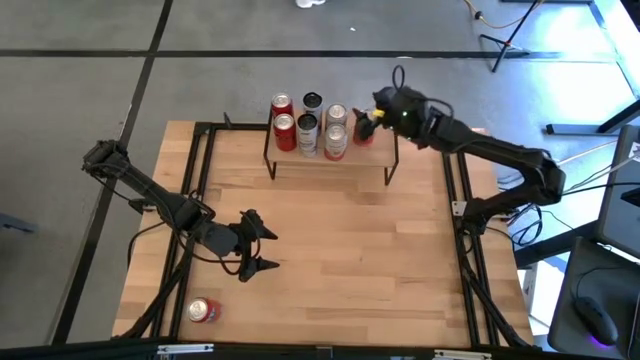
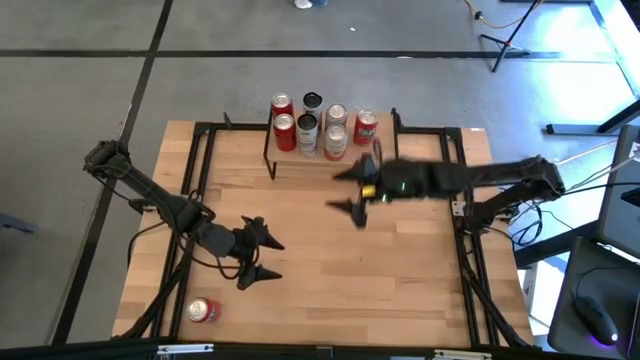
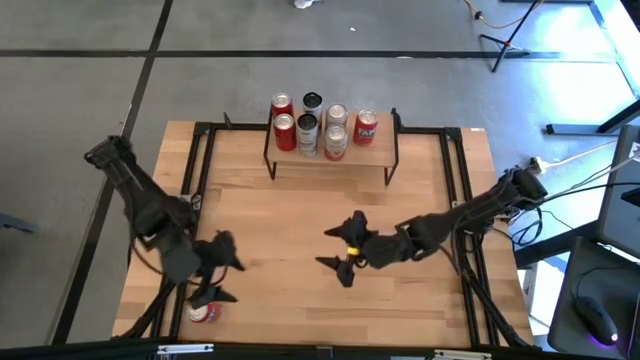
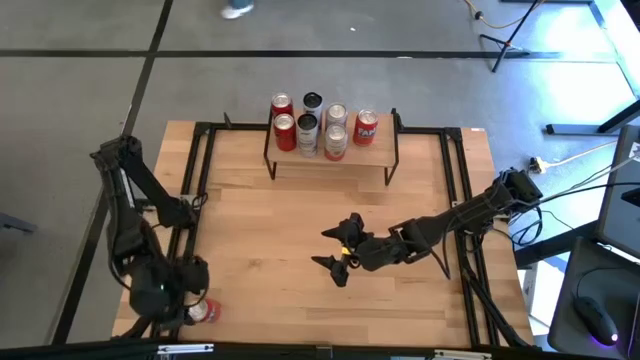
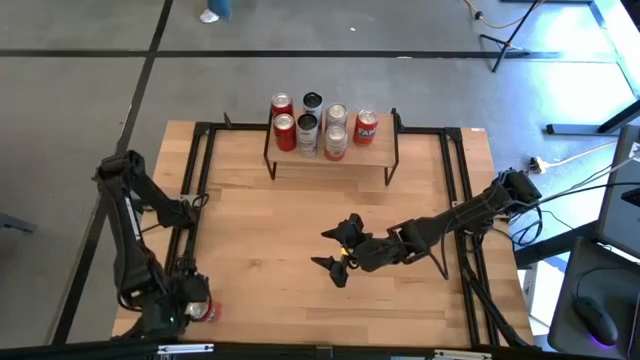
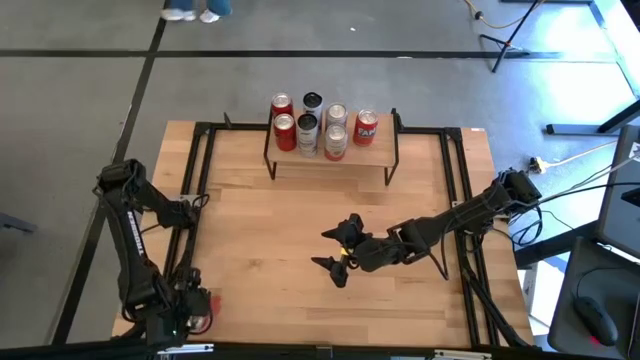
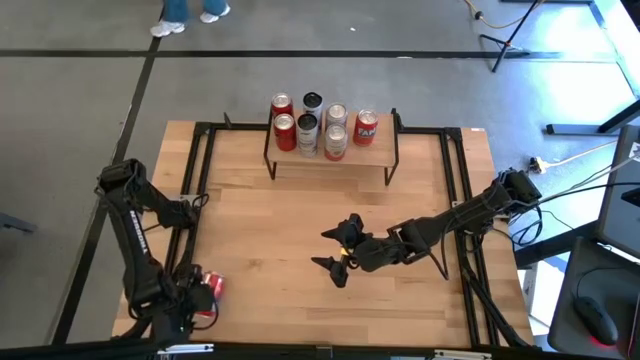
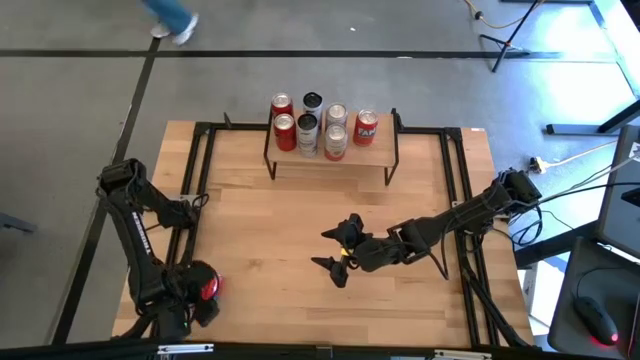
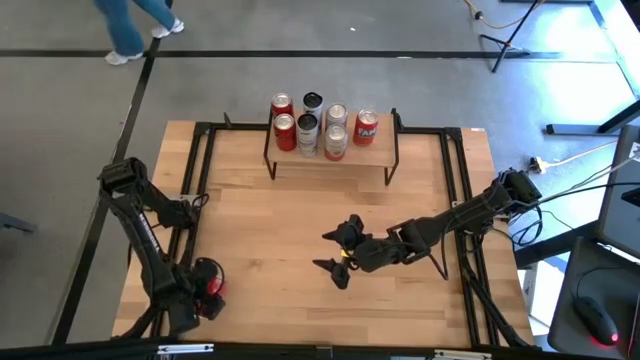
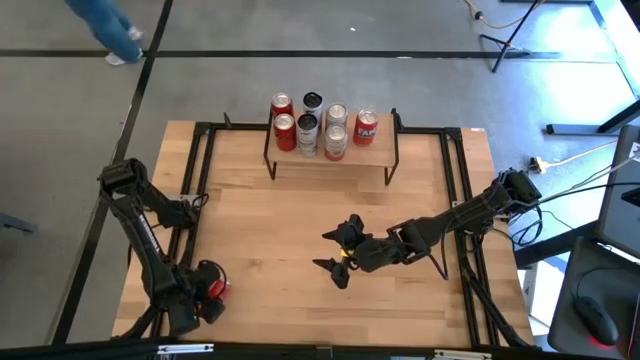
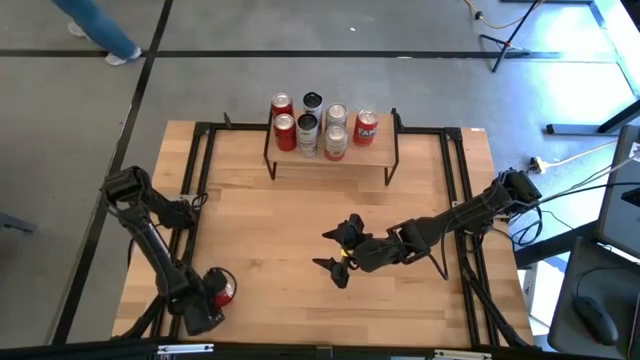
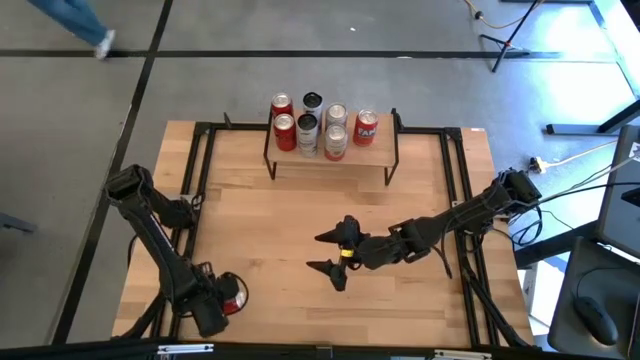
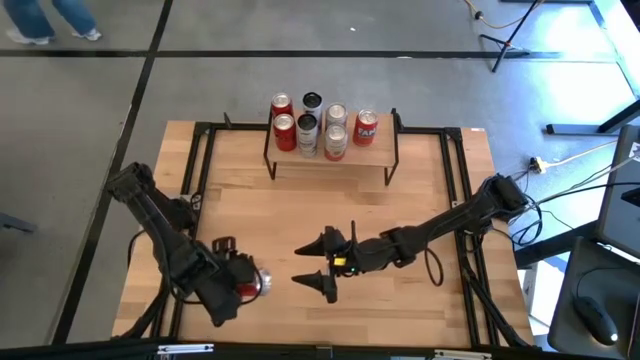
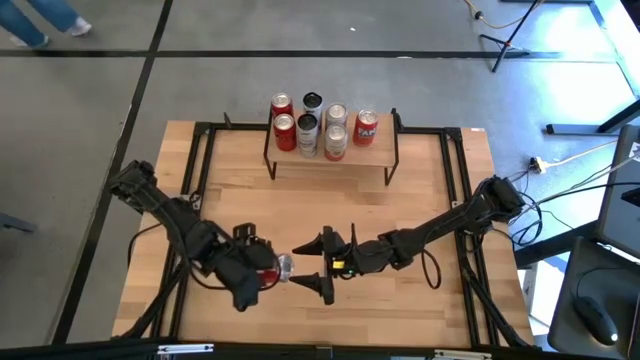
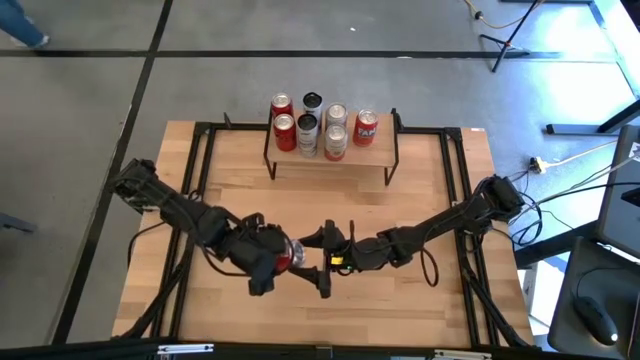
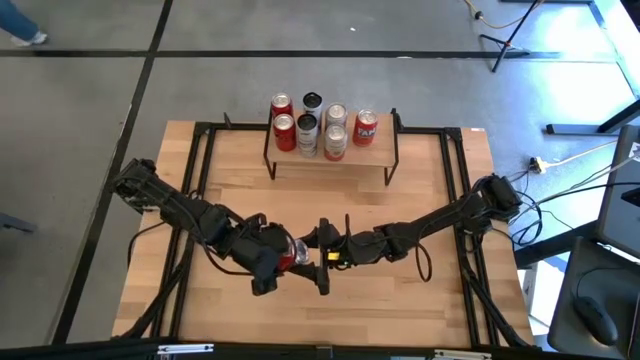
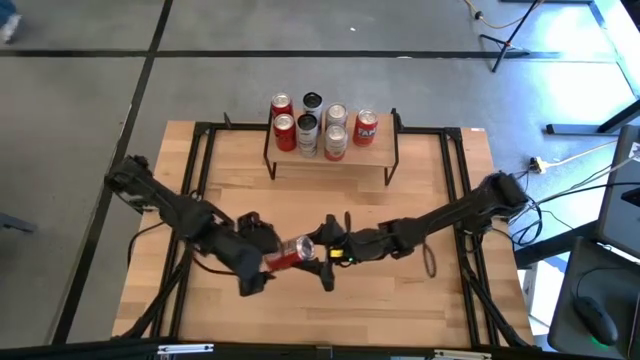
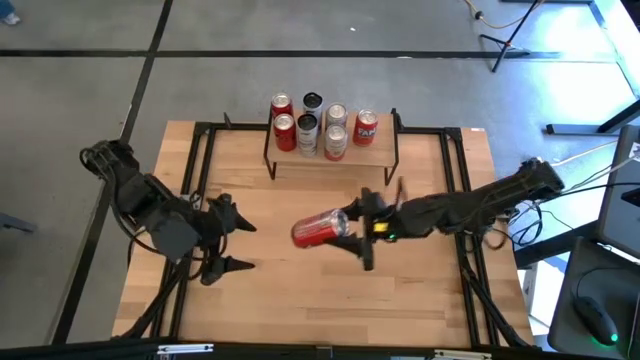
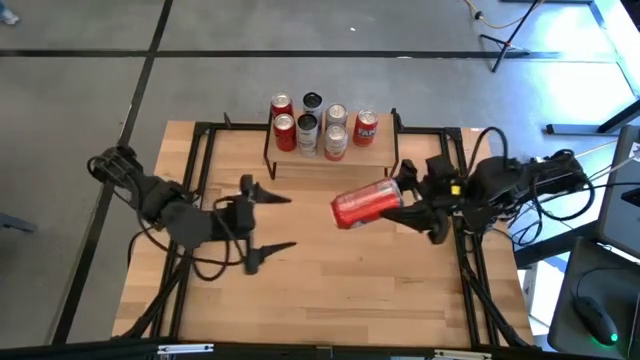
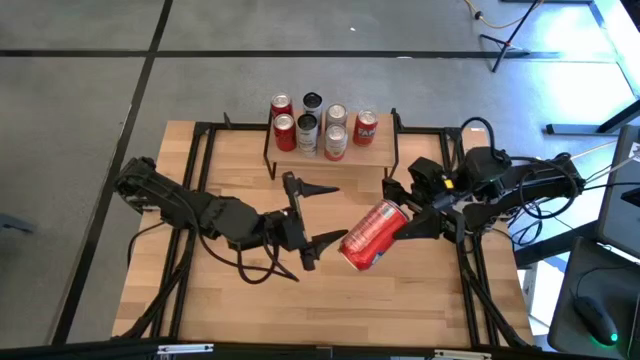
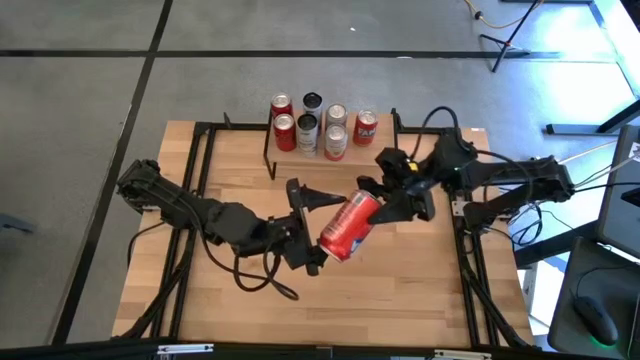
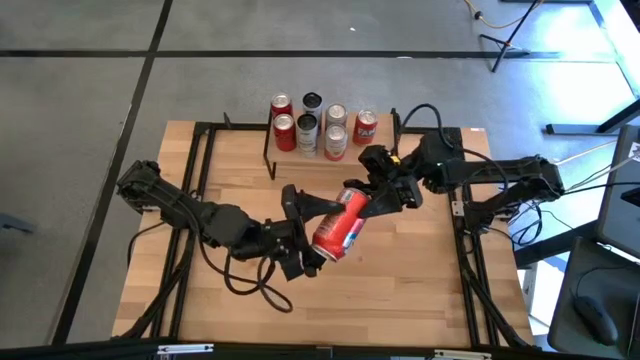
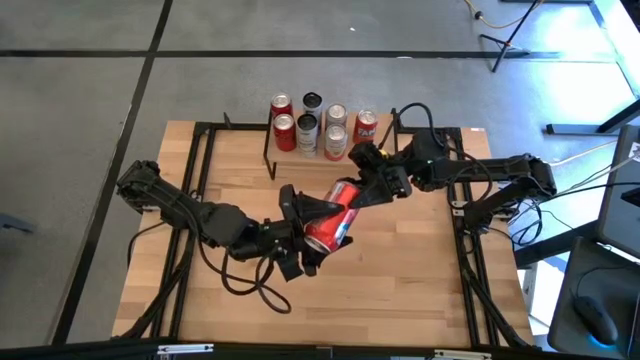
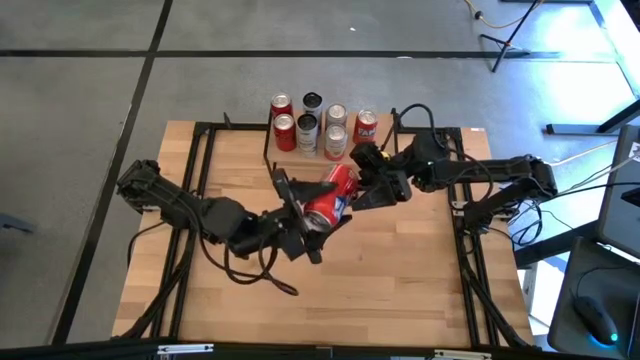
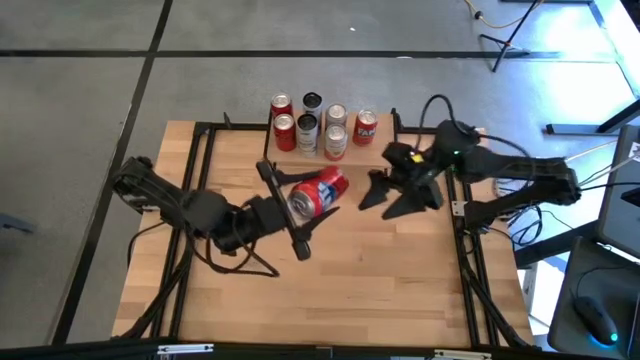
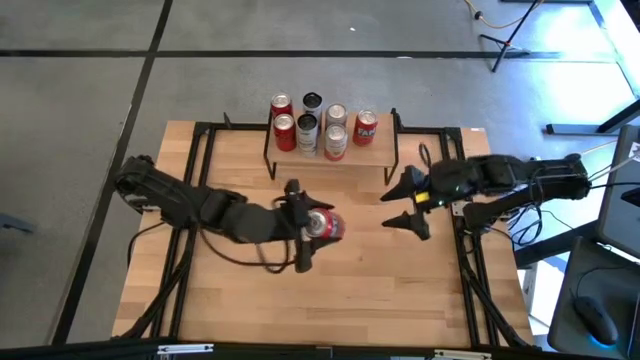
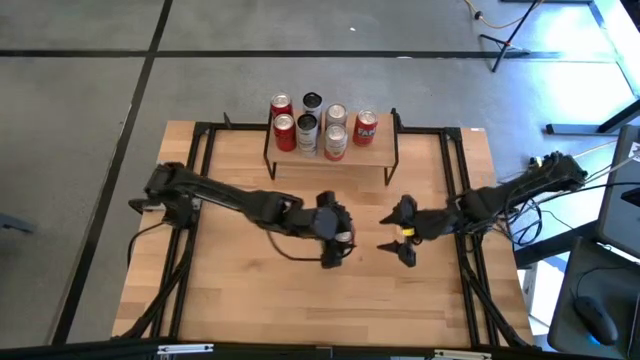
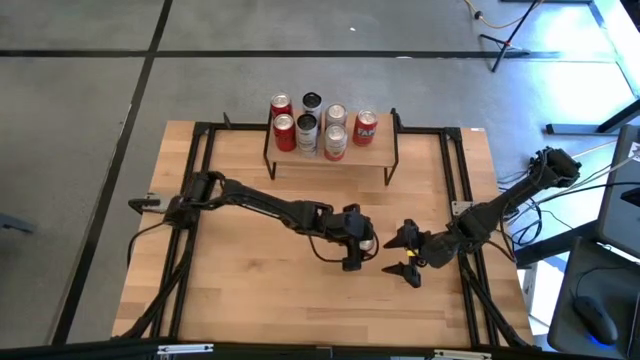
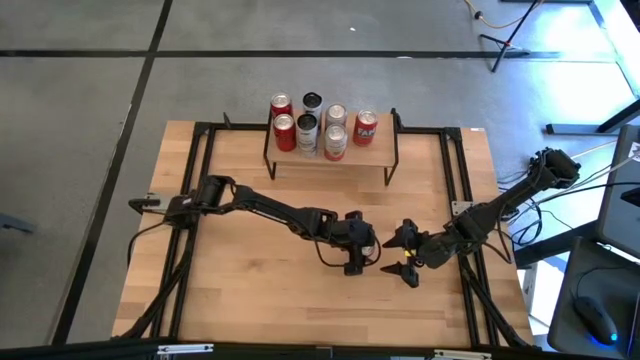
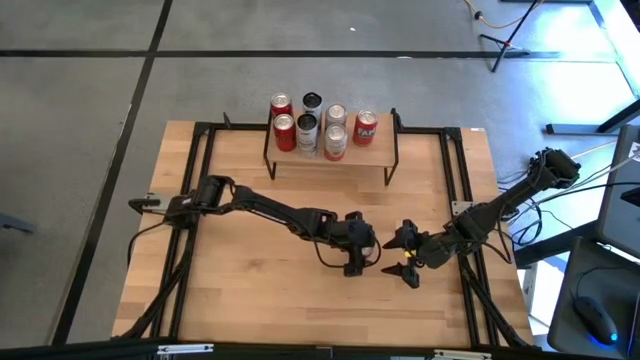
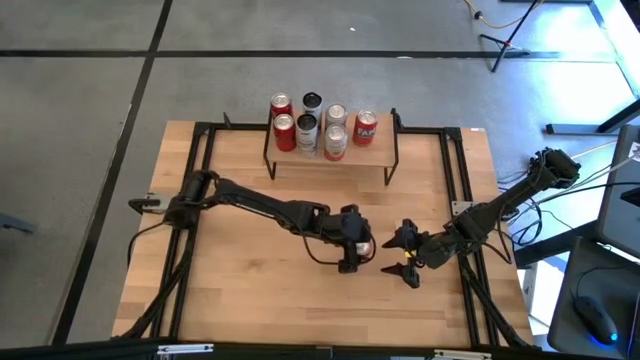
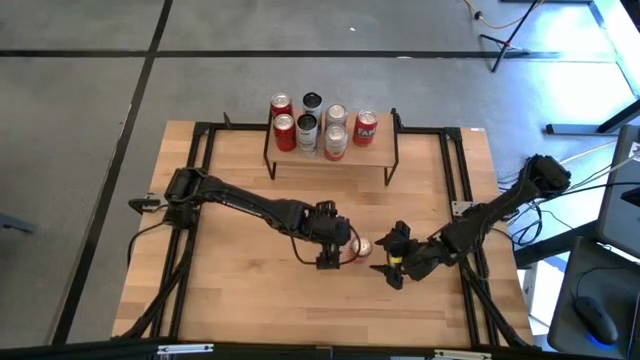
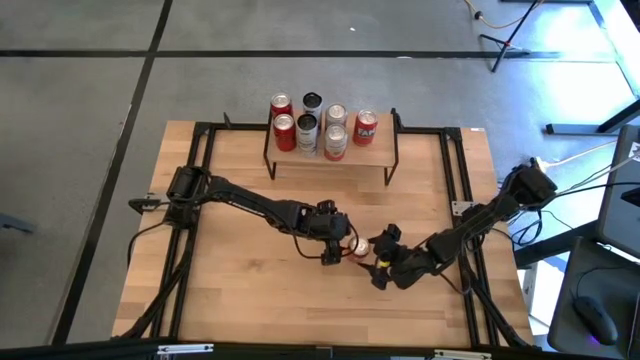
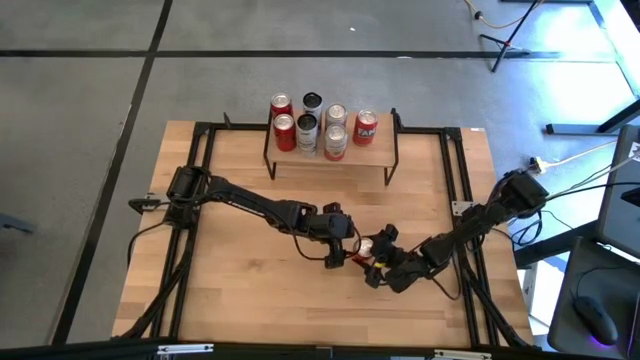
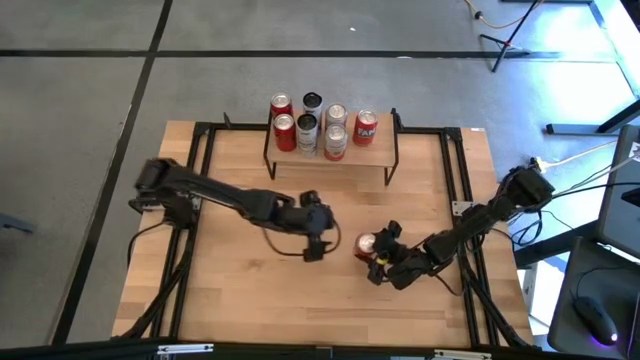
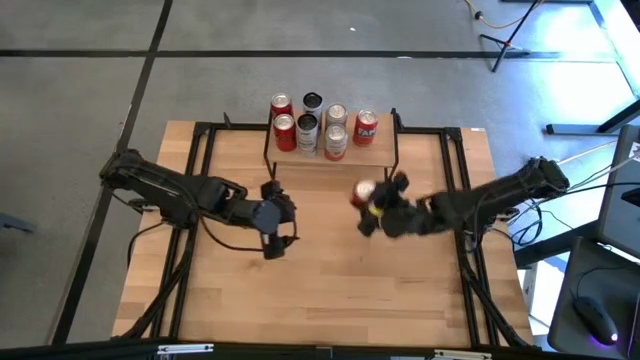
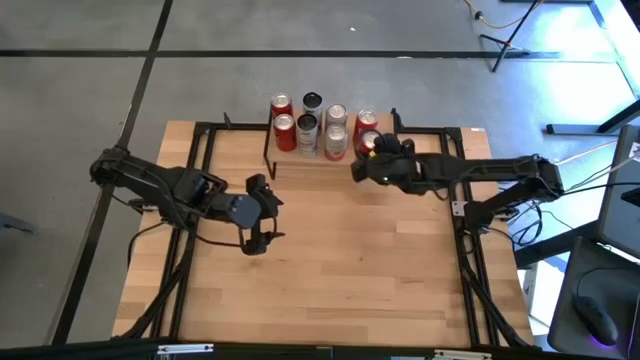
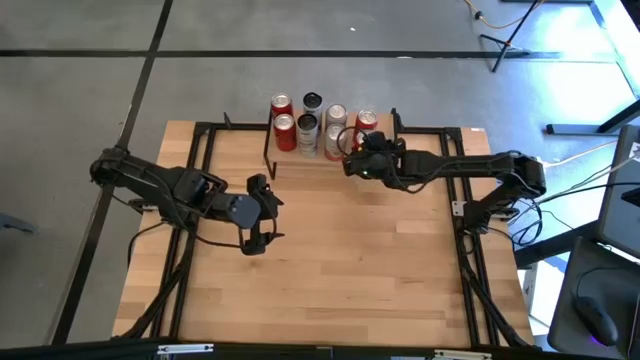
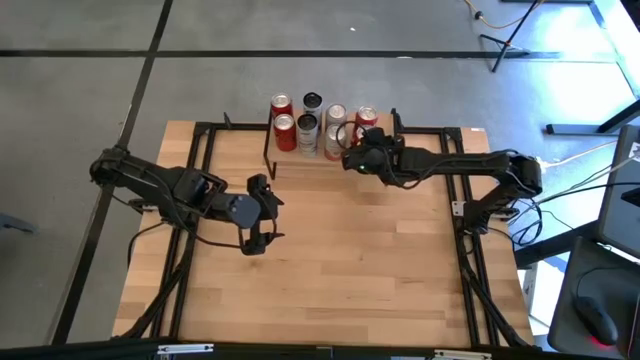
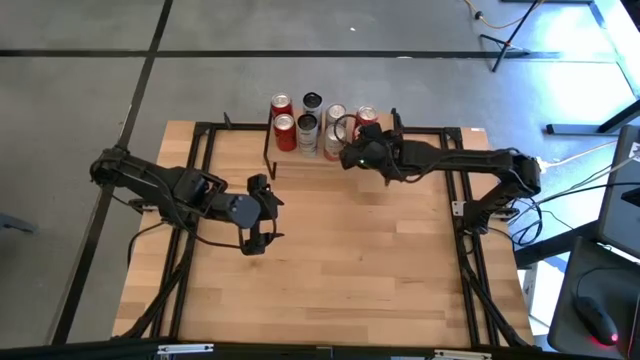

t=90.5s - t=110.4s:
Task: Place canned beverage on shelf
Put the red soda can on the shelf aligned with the other red soda can

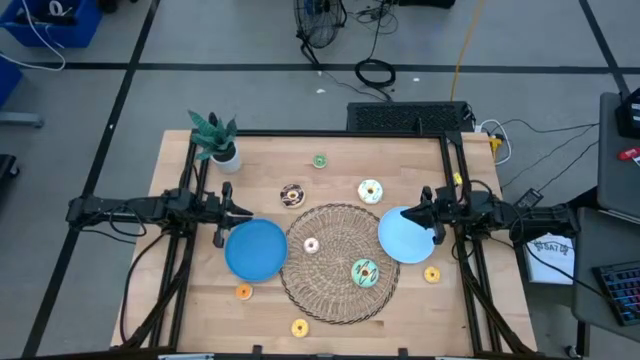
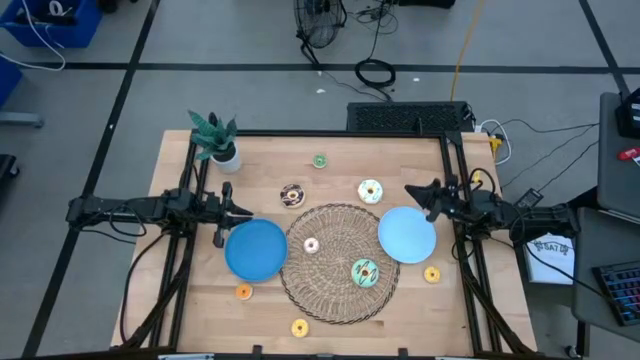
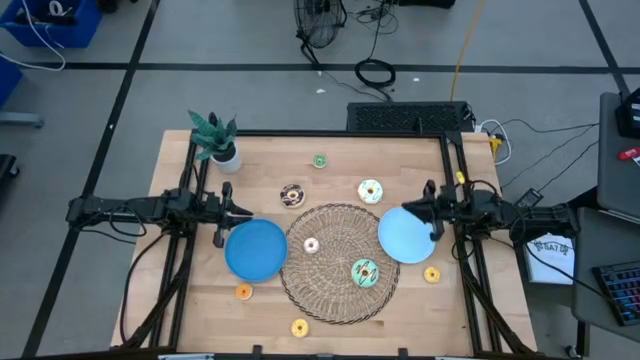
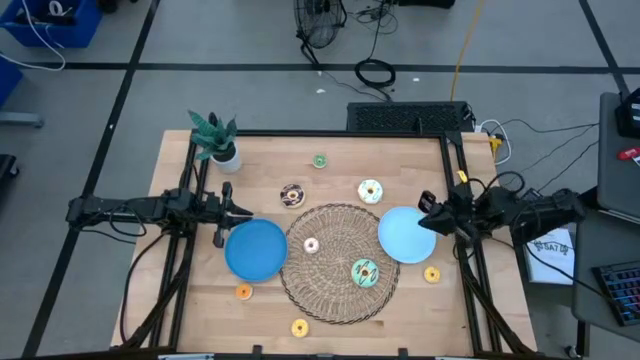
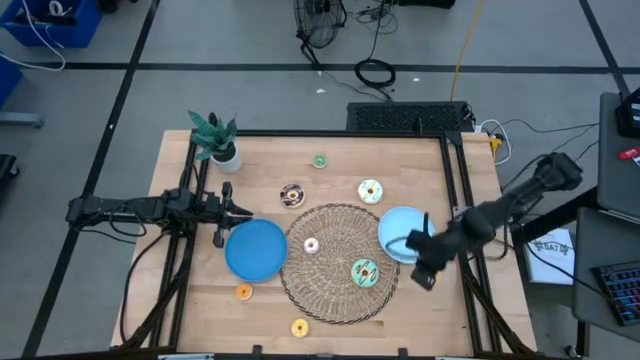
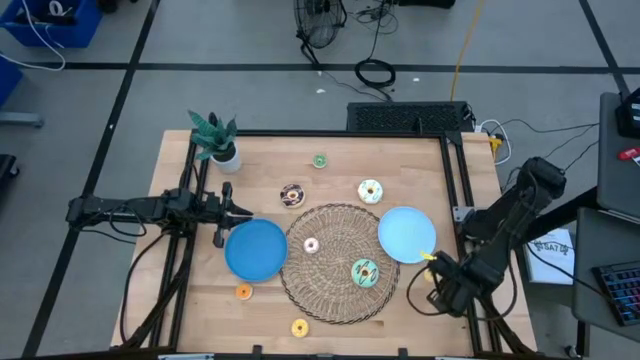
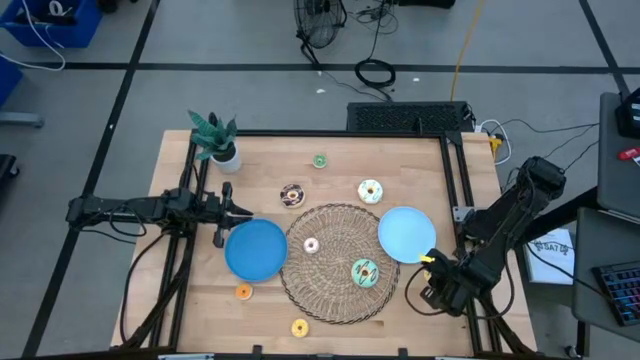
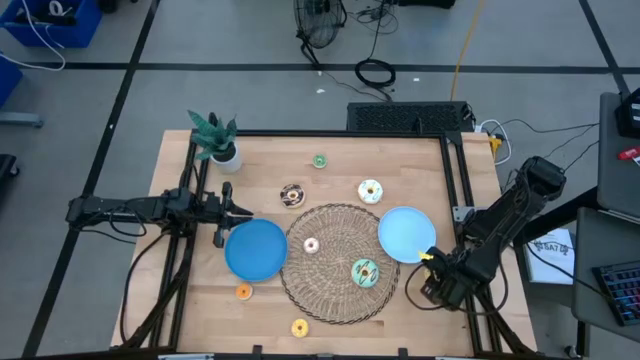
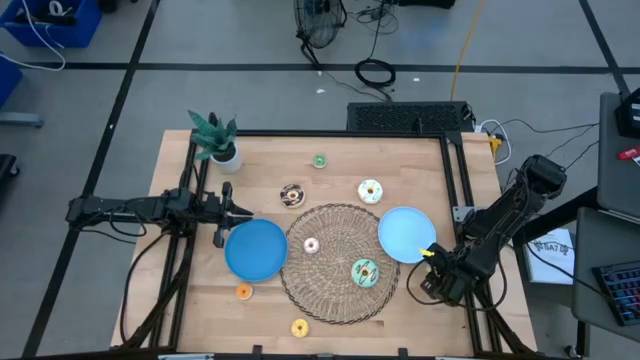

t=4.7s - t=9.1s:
Task: Pick & Place donuts
Put the top small yellow donut on the light blue plate
